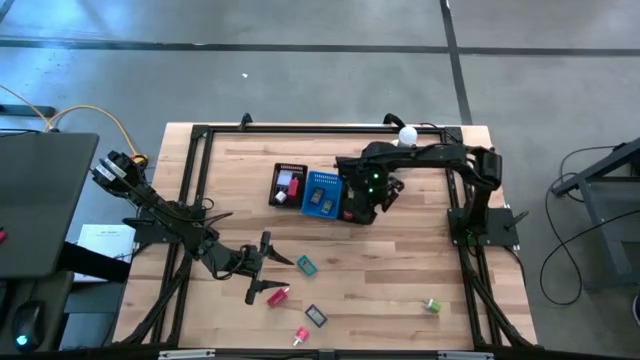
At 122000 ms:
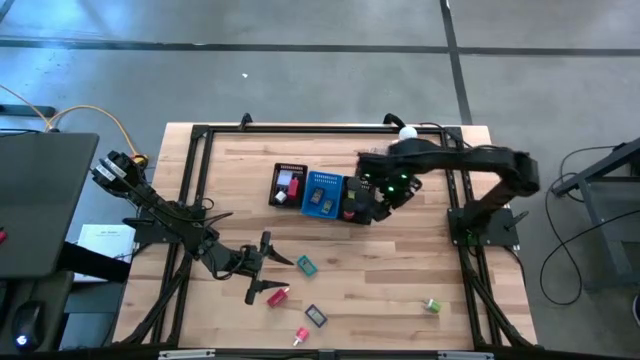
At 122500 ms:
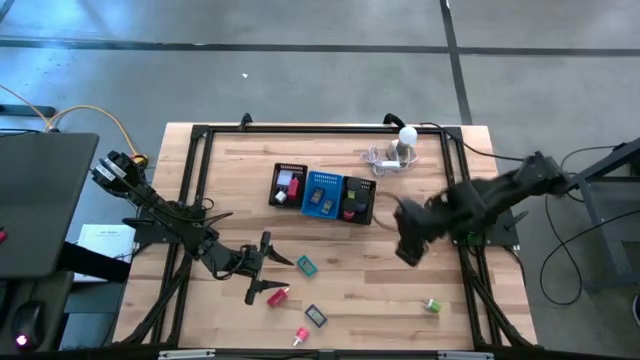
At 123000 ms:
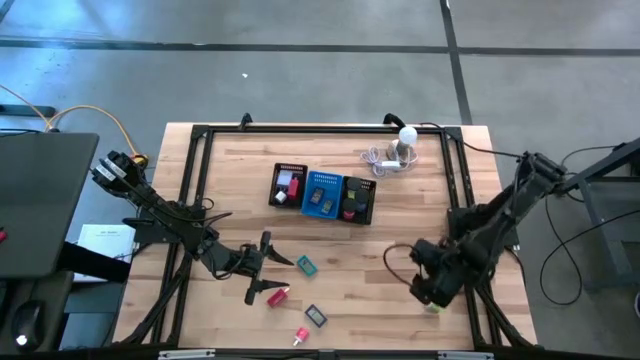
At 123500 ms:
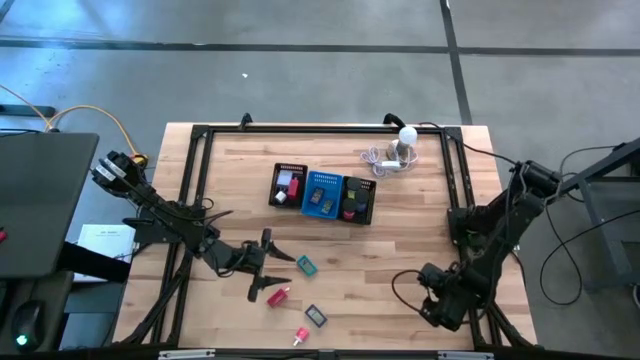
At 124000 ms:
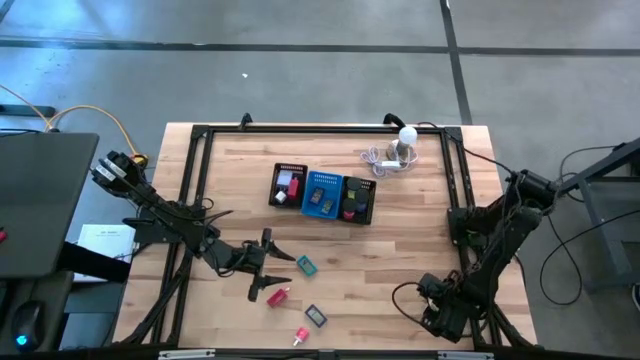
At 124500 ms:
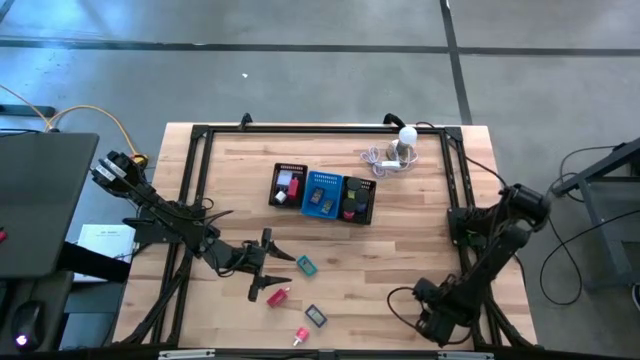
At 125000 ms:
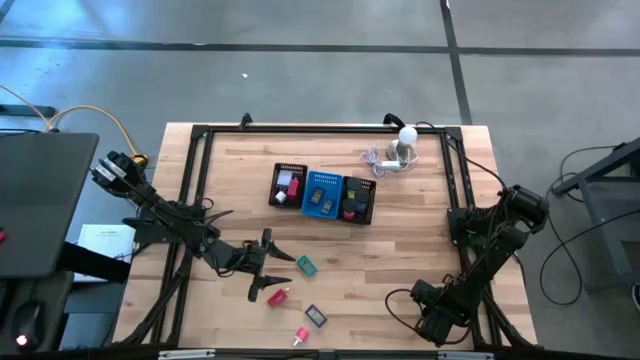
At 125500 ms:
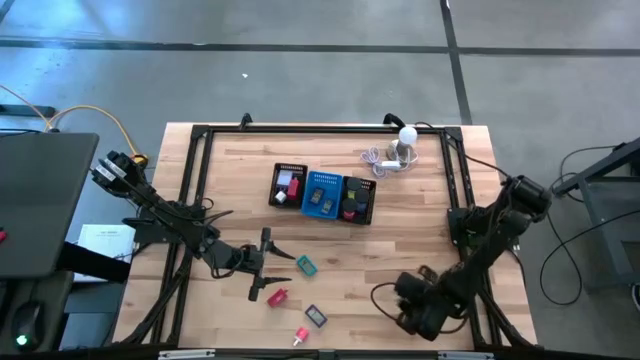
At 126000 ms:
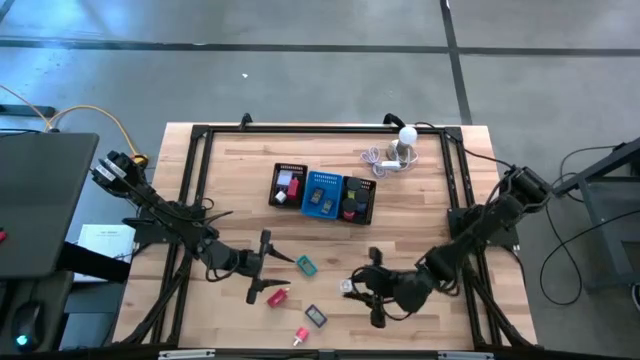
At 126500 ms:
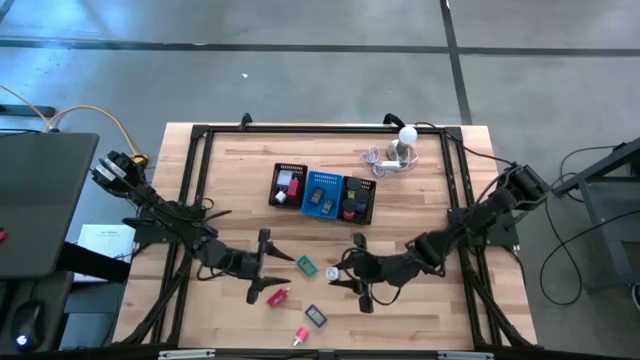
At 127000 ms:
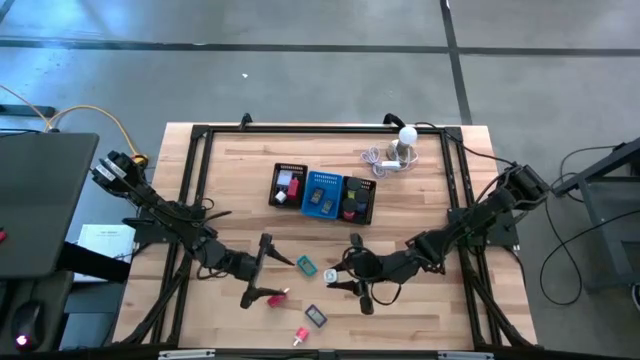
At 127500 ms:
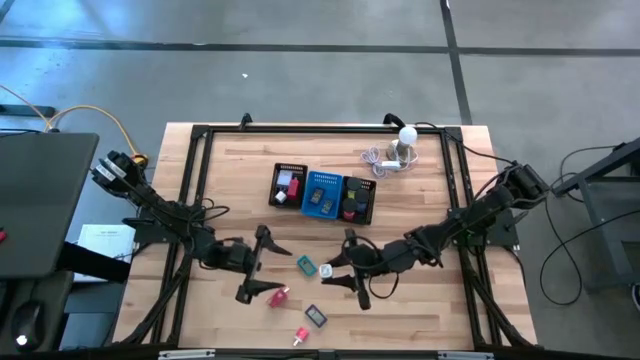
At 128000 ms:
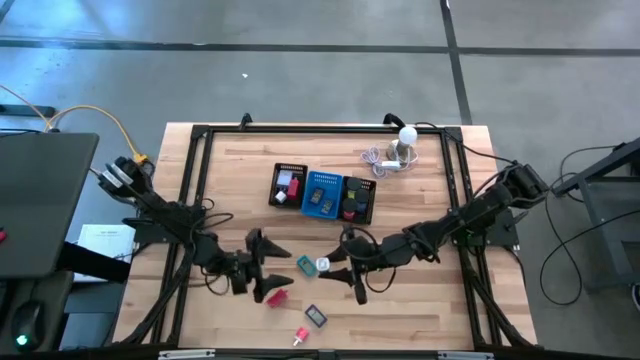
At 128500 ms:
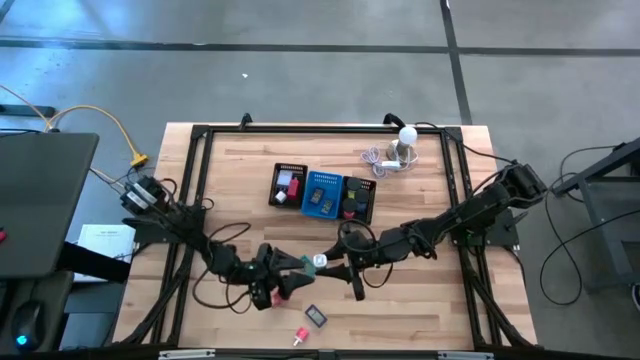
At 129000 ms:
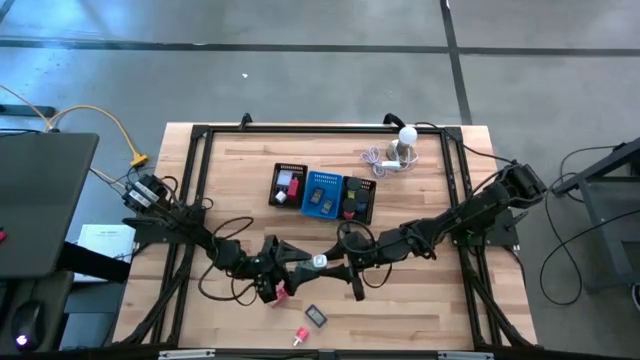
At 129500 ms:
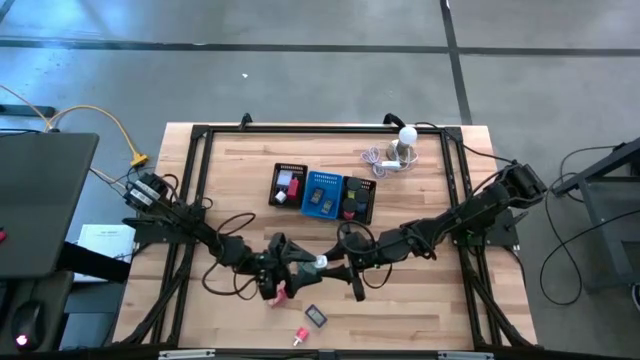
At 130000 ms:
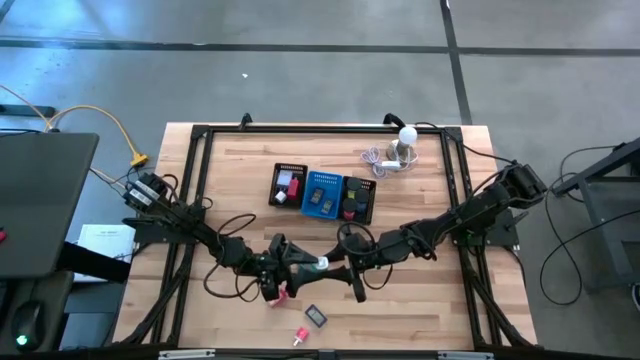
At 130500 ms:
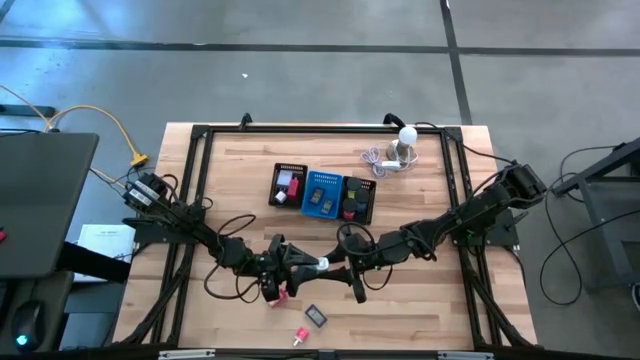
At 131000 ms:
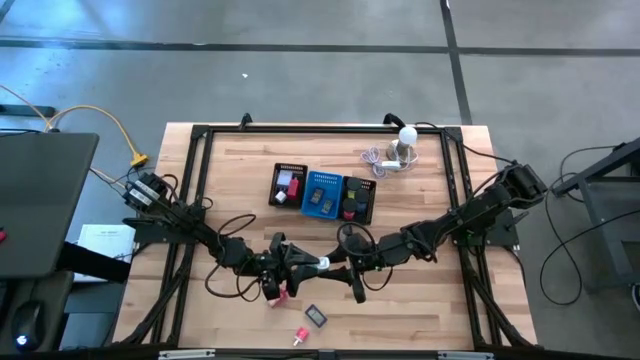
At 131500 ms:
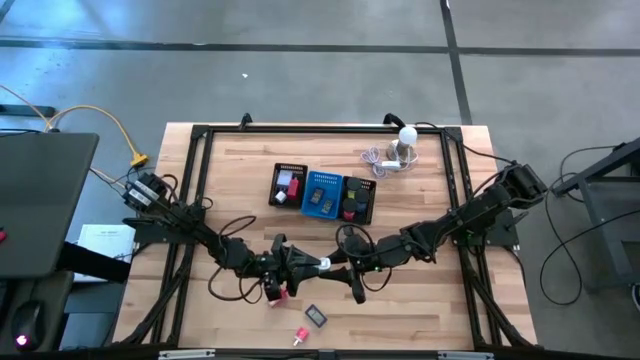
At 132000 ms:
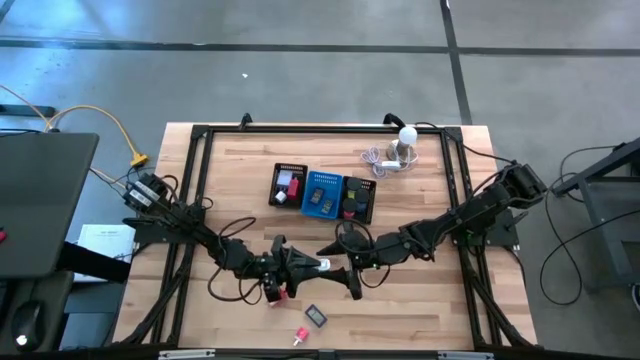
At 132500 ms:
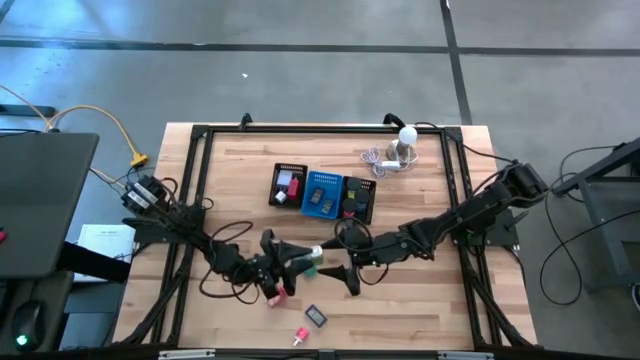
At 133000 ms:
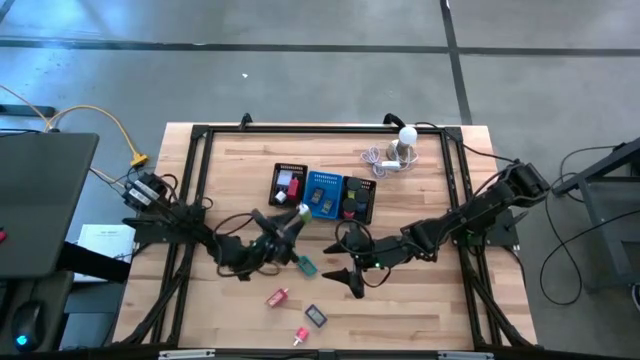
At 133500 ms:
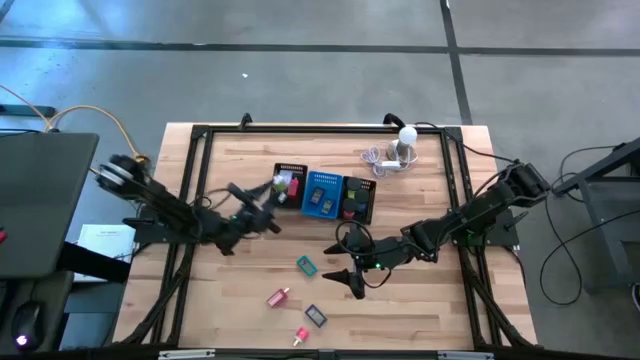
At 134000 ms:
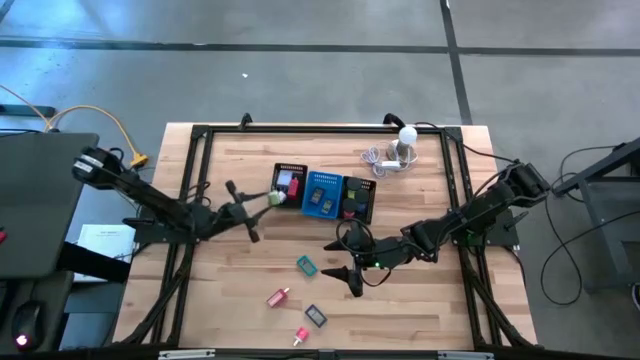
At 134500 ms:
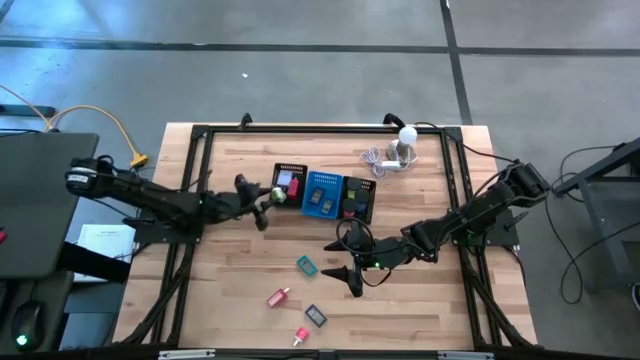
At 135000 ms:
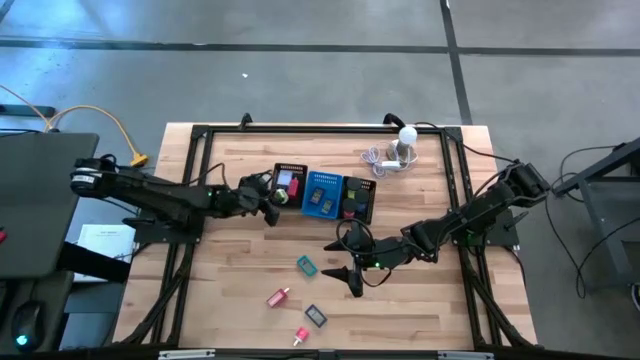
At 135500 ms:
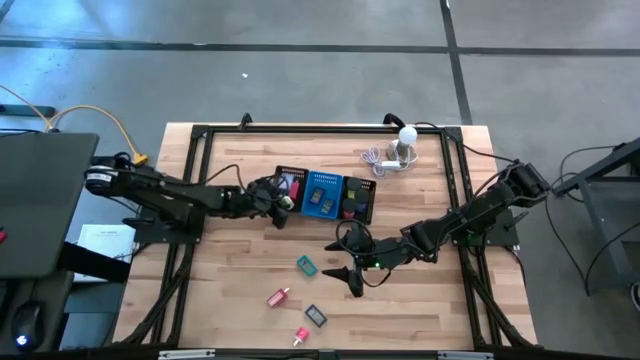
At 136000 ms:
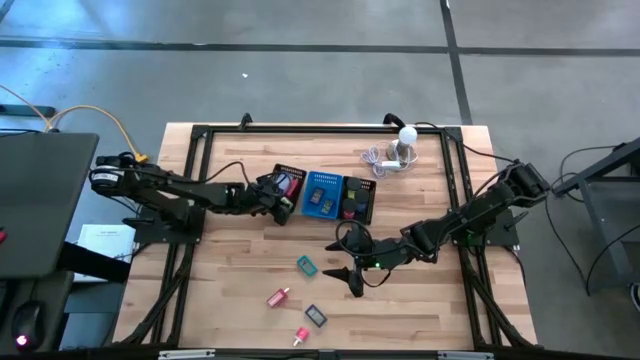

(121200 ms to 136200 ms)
Task: Pick & Place Office items
Put the green charger adapter into the left black bin

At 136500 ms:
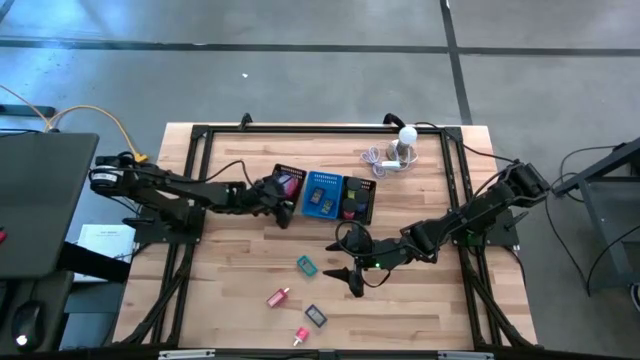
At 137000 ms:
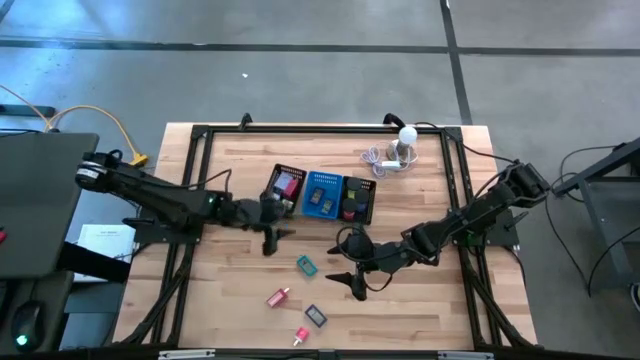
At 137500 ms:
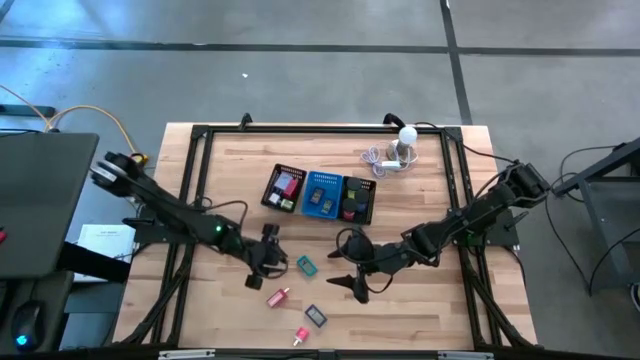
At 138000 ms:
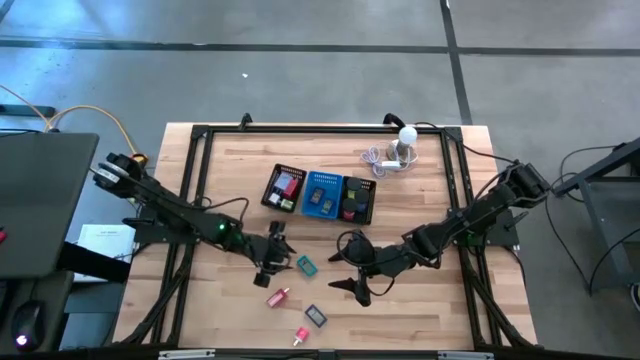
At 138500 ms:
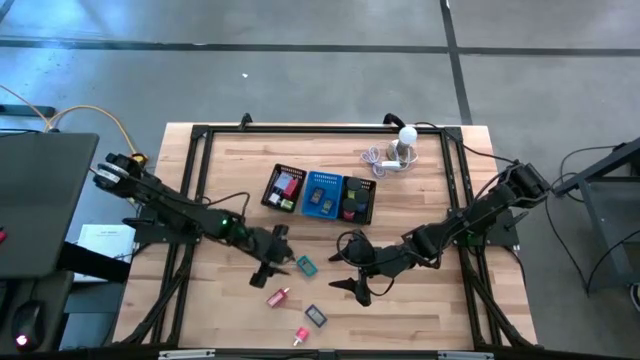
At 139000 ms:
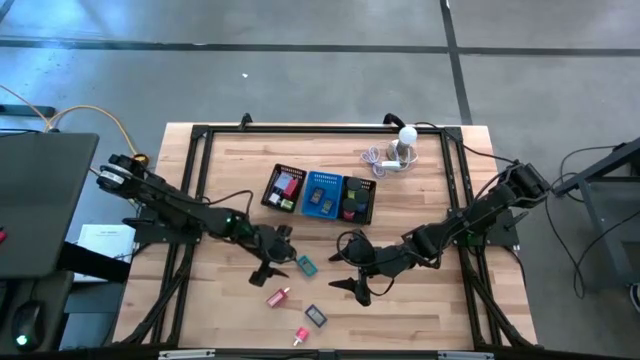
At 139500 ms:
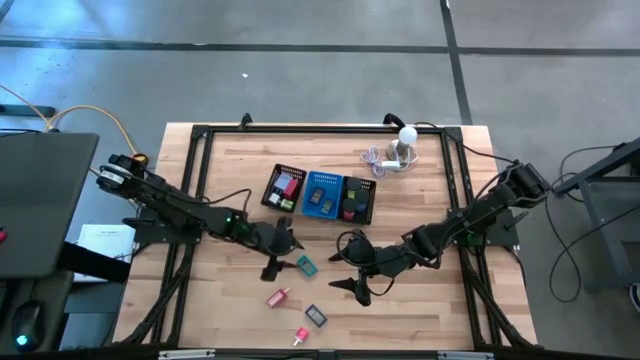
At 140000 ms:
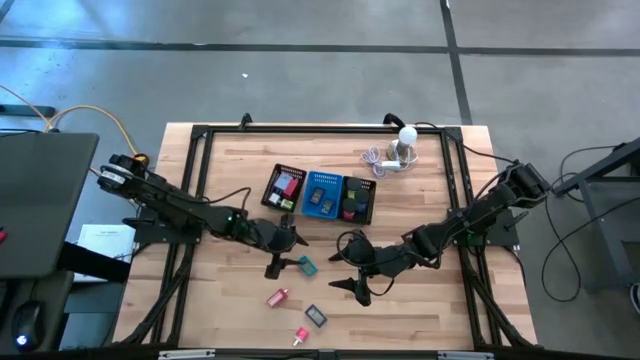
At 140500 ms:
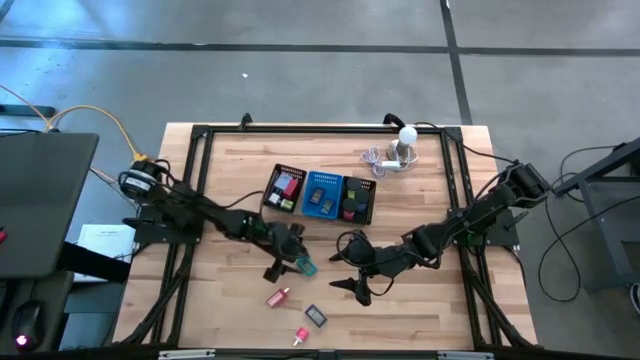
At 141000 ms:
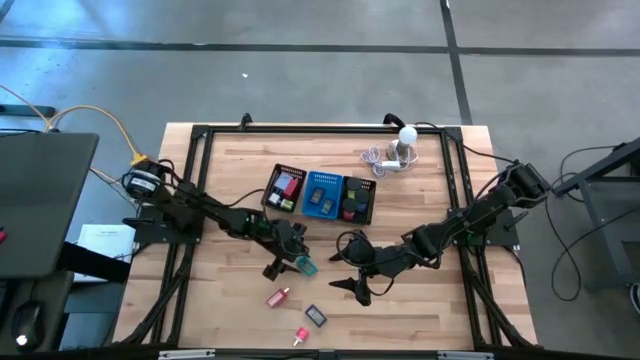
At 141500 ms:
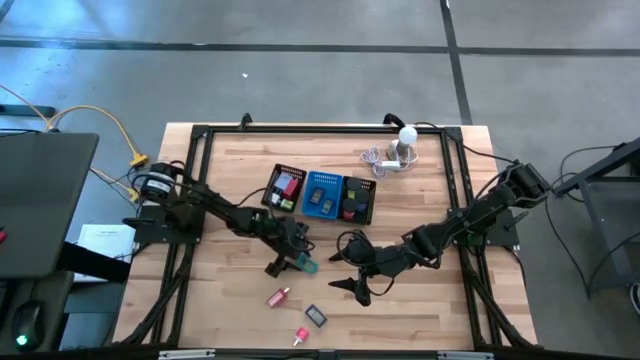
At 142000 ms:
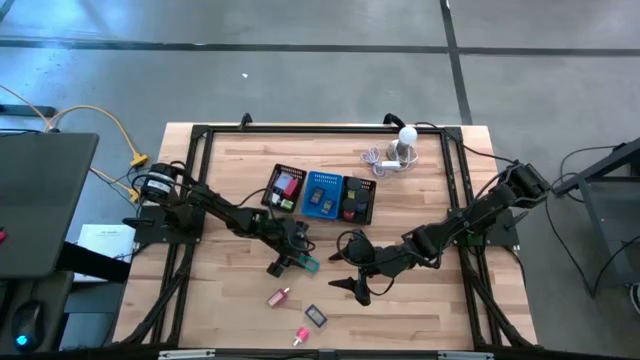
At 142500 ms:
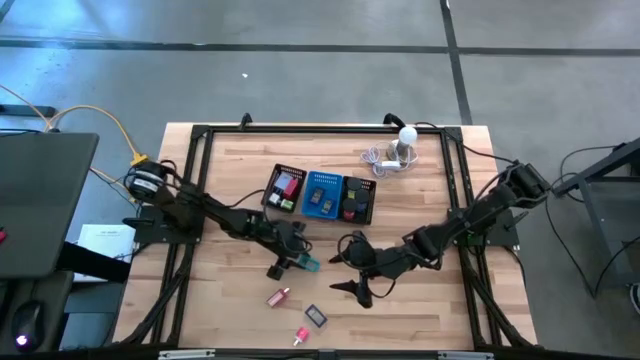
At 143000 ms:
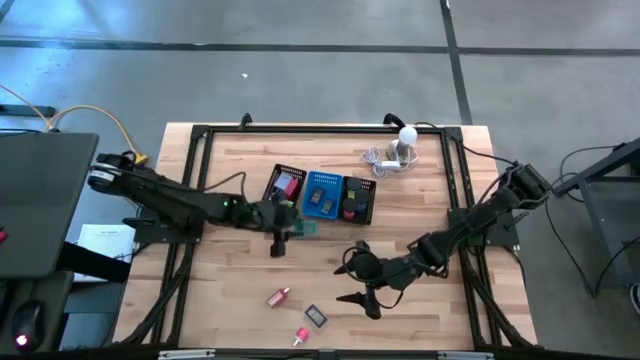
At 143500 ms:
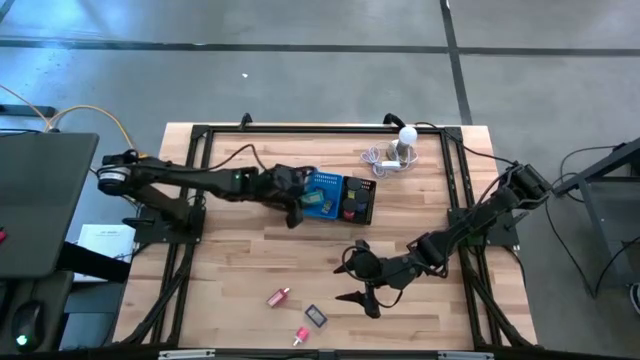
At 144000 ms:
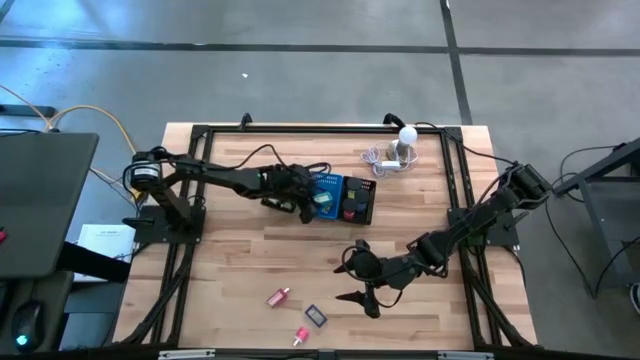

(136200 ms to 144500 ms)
Put the light blue digital clock into the blue bin
